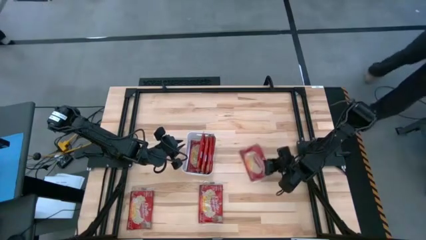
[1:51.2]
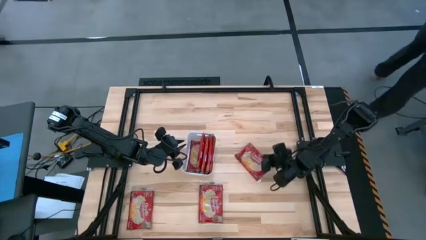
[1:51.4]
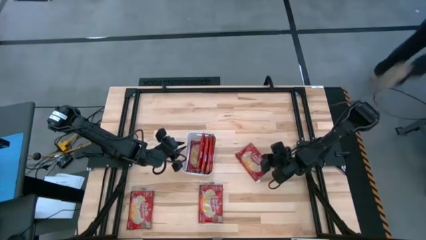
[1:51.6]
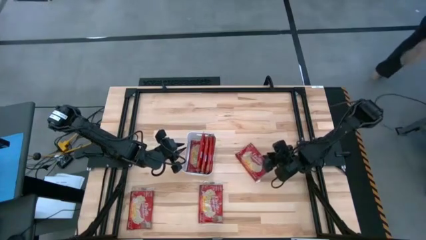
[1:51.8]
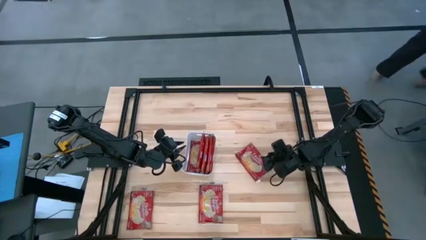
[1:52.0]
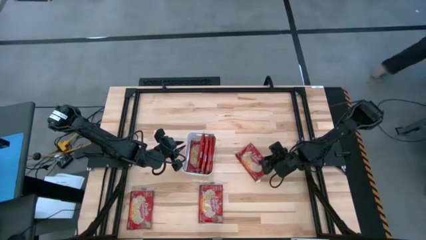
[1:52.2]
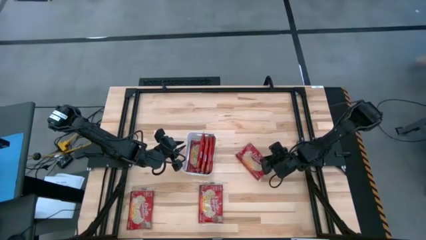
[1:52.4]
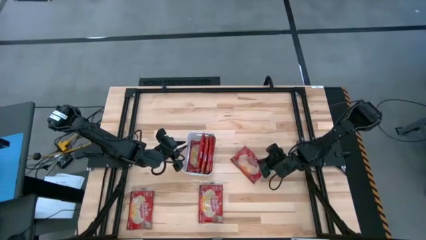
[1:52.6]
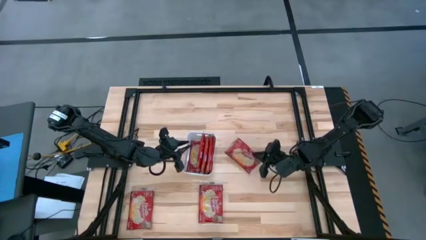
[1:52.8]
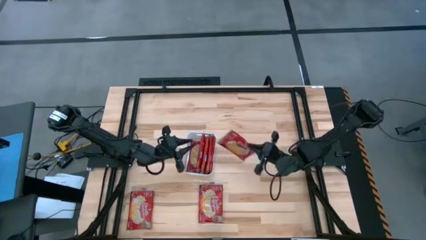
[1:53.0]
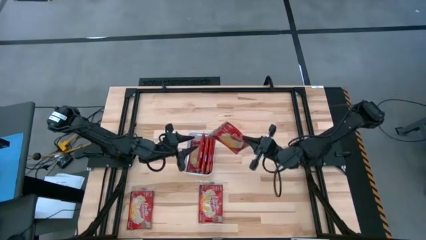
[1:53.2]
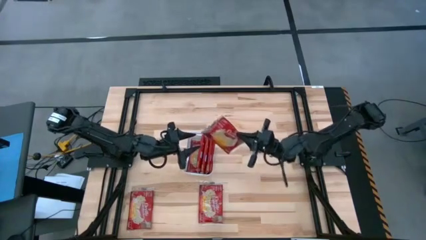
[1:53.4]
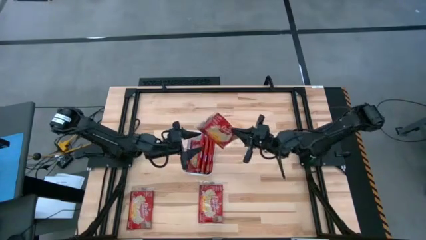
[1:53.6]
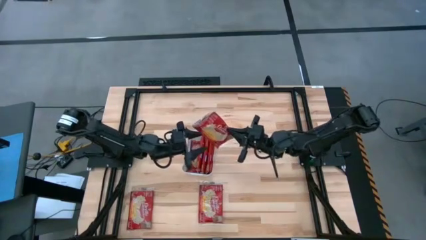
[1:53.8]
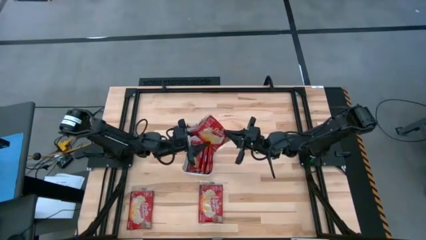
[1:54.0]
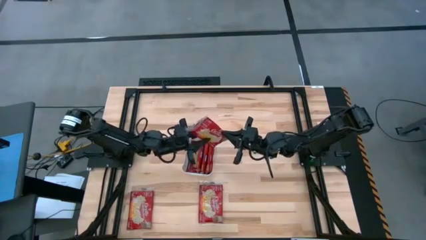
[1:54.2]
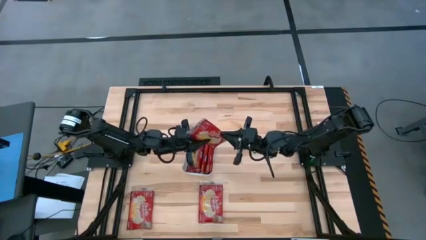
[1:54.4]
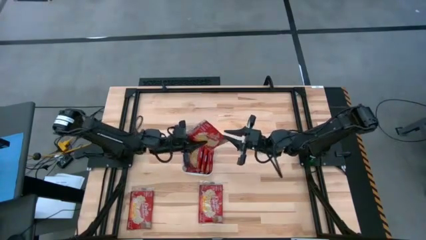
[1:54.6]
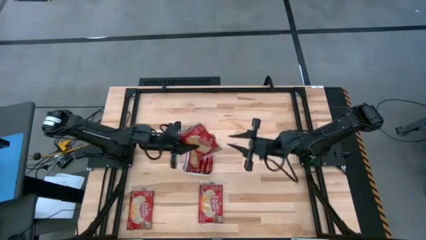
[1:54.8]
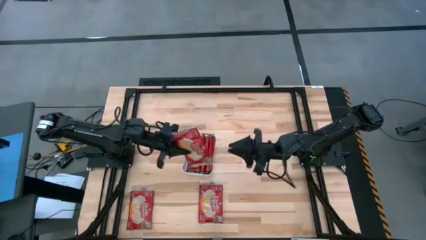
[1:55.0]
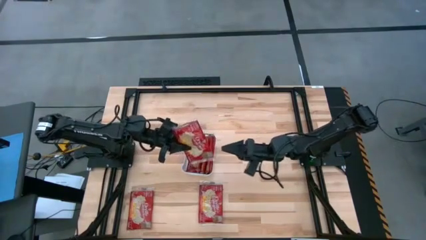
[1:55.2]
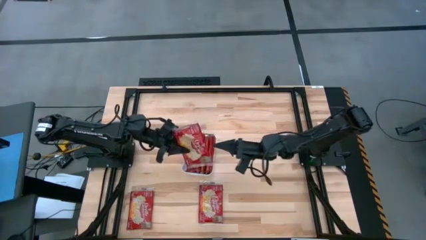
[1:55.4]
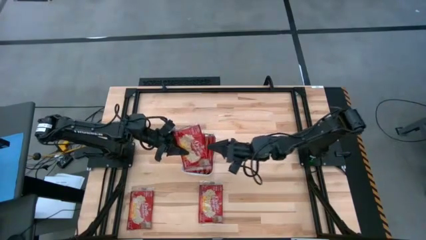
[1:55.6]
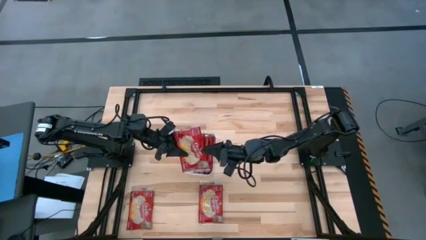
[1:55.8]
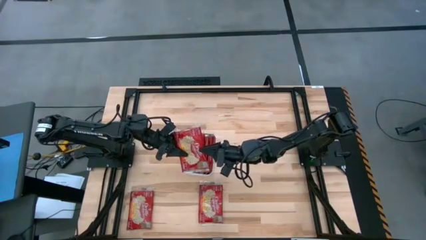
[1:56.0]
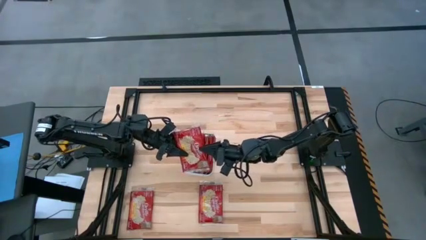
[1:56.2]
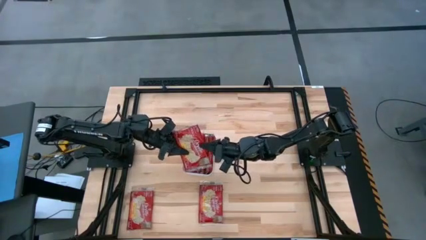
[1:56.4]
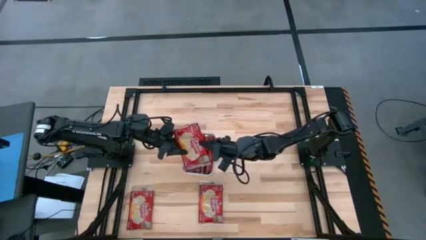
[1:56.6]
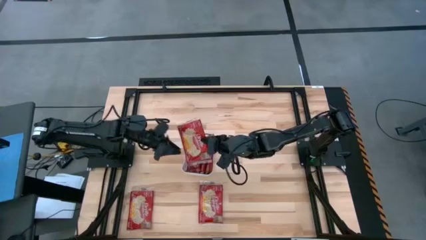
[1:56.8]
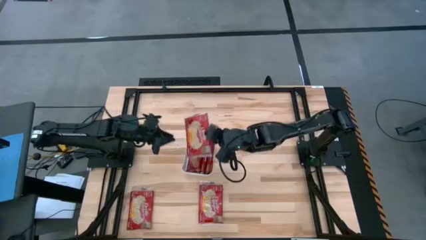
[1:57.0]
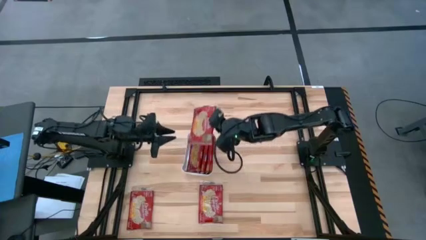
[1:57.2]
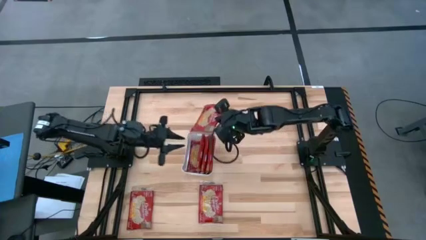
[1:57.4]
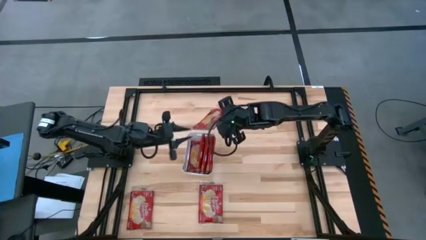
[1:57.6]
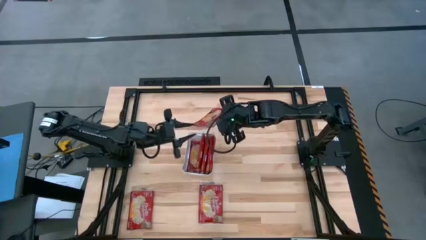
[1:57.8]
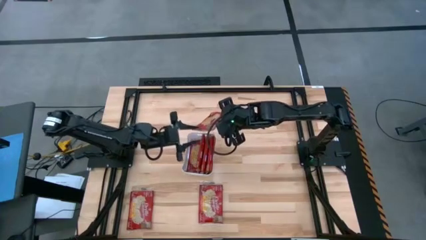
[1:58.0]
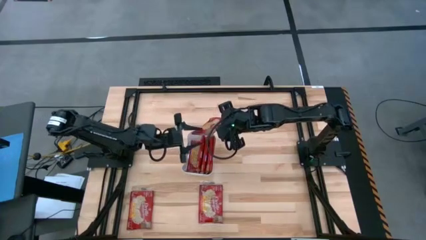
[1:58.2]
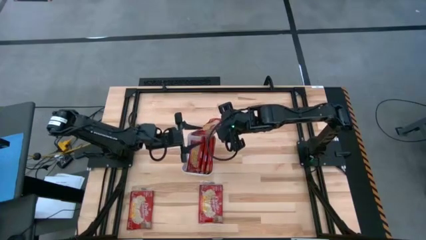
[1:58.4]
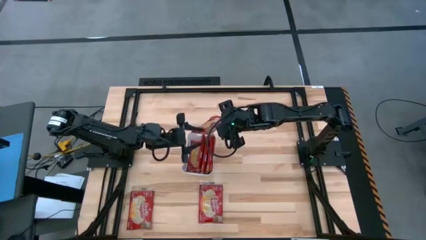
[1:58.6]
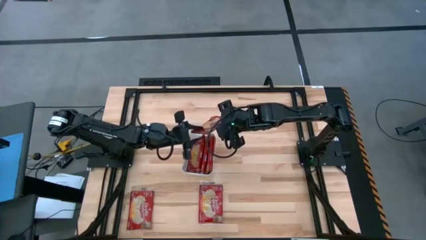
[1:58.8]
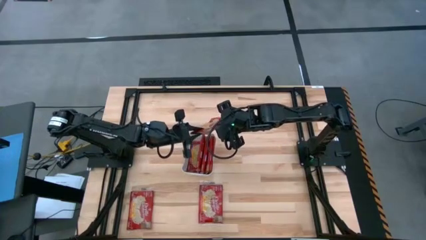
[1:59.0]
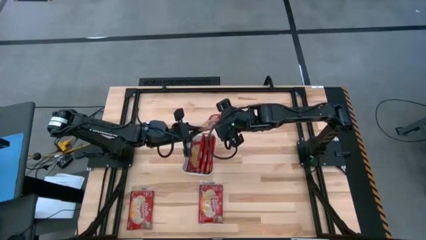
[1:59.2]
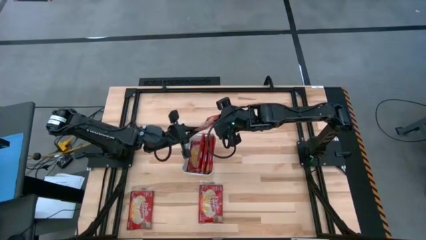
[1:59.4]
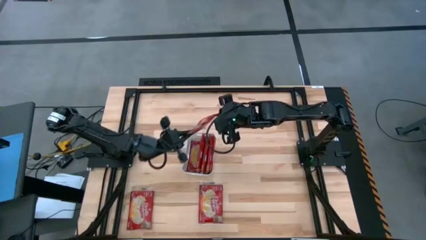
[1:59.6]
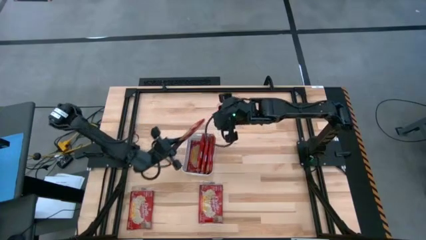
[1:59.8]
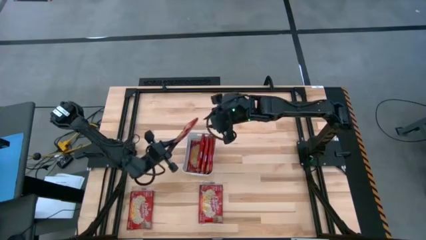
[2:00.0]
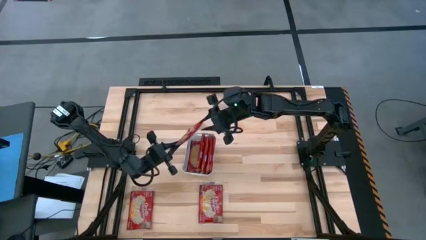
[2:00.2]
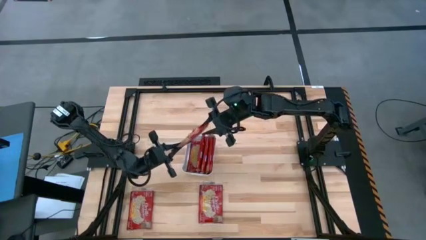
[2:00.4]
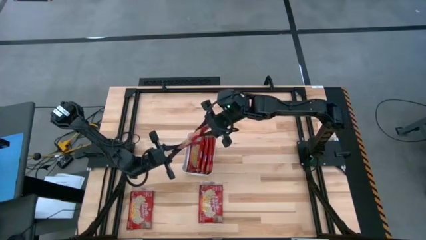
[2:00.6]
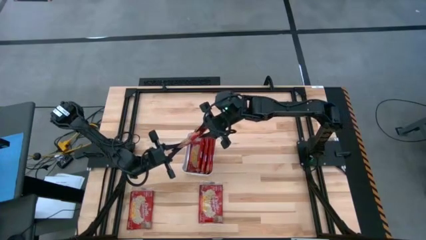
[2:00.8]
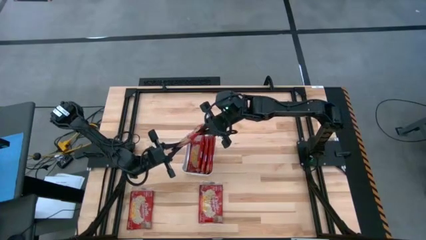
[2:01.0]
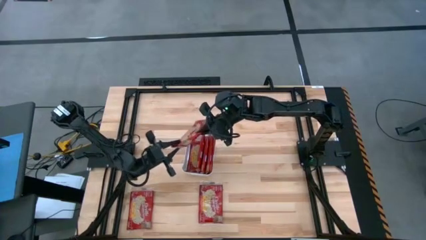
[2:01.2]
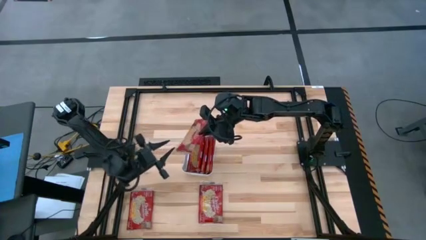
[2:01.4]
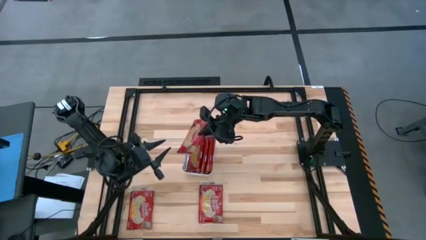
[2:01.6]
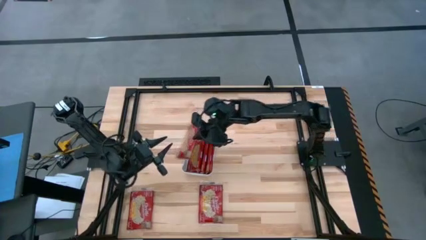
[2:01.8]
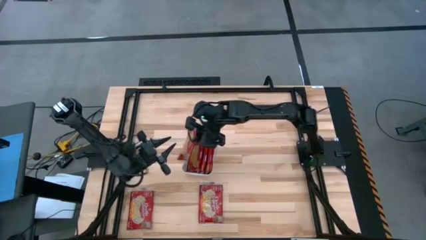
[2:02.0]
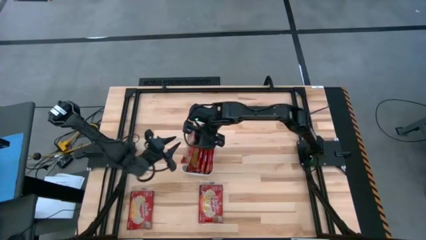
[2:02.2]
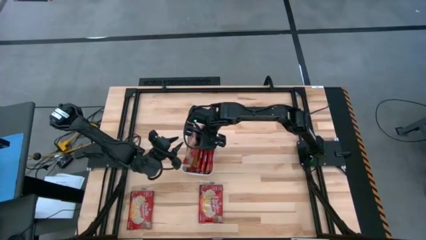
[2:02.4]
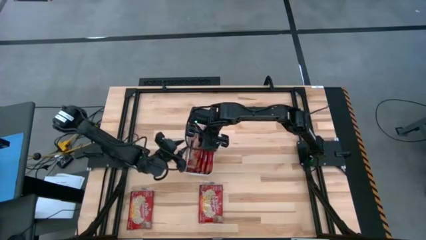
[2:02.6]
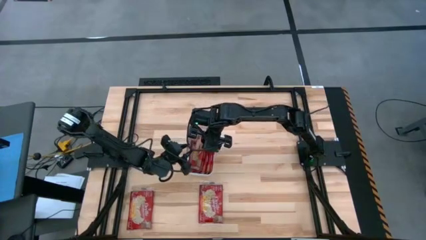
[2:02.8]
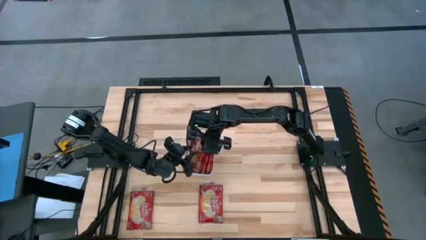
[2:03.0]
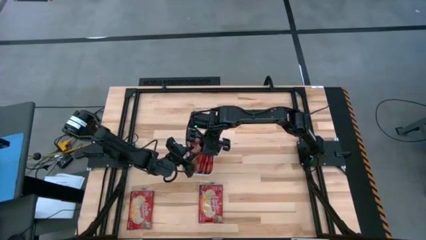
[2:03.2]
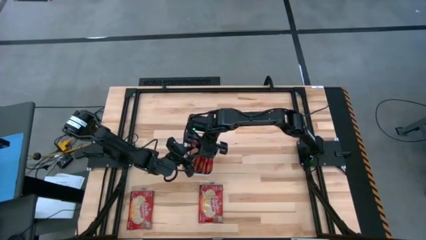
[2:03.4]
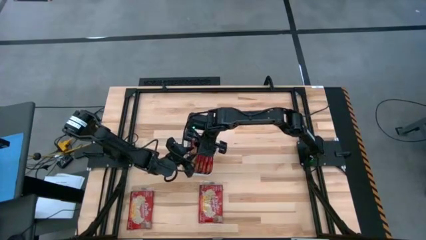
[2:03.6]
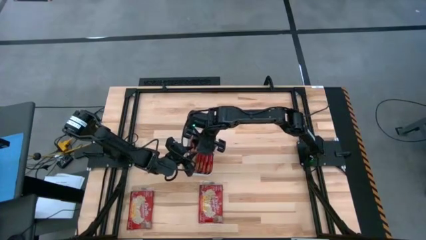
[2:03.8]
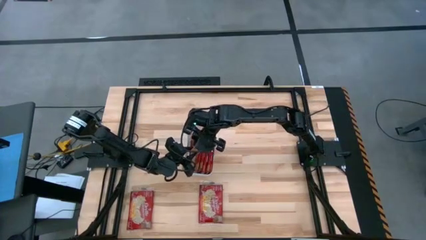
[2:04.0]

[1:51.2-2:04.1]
Task: Sort popcorn bags into baskets
Put the red popcorn bag into the white bin

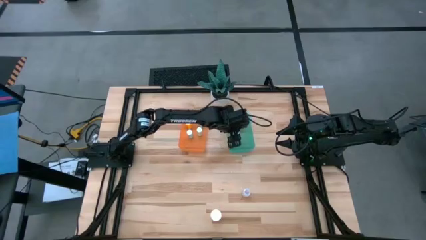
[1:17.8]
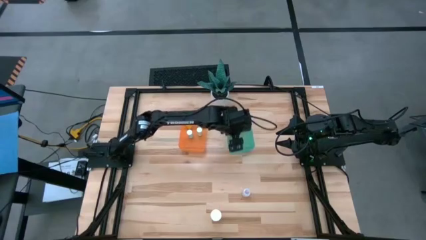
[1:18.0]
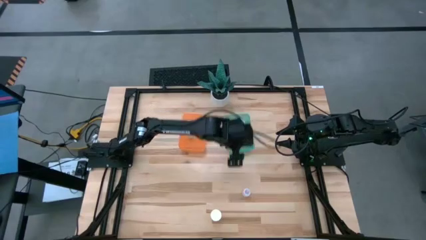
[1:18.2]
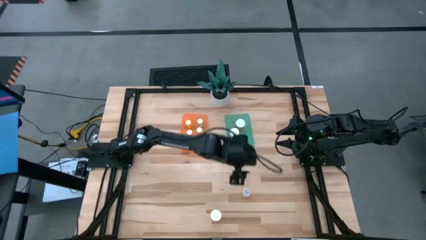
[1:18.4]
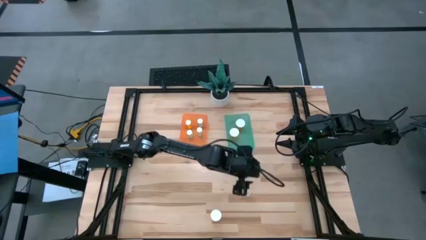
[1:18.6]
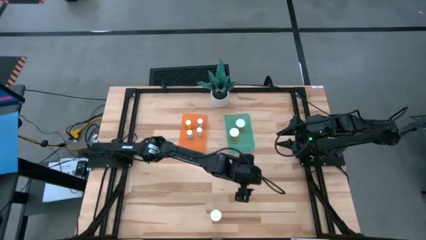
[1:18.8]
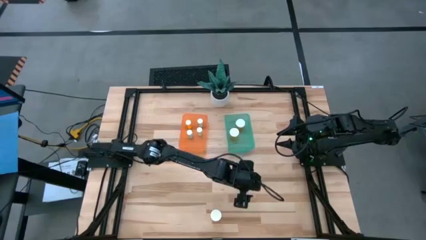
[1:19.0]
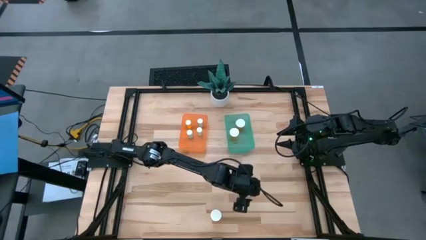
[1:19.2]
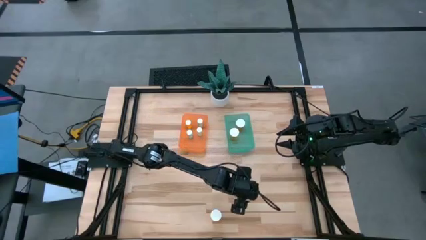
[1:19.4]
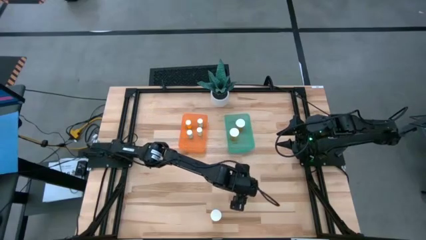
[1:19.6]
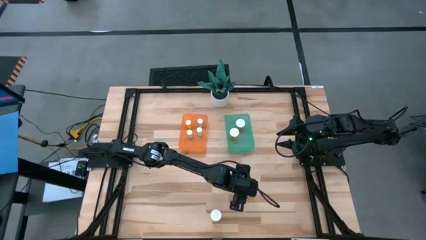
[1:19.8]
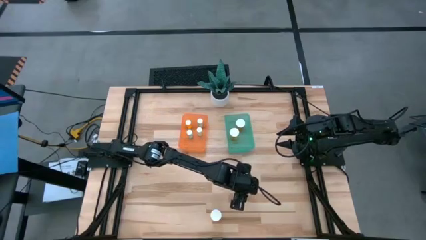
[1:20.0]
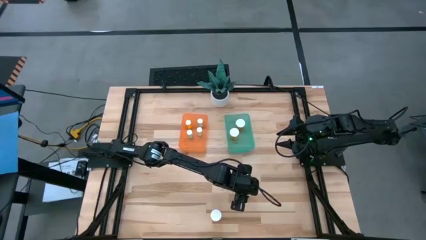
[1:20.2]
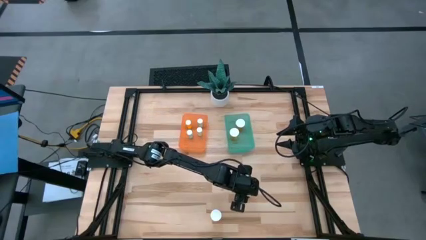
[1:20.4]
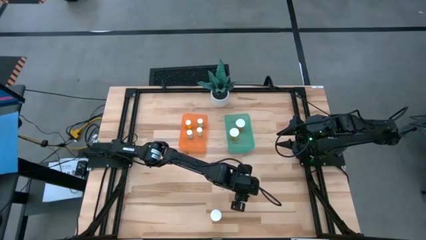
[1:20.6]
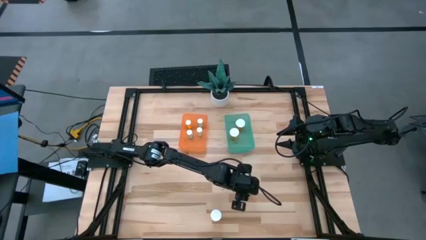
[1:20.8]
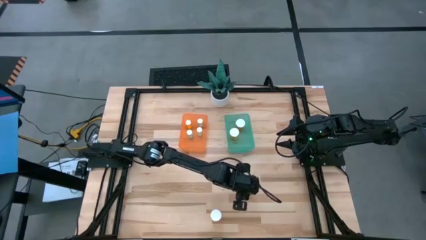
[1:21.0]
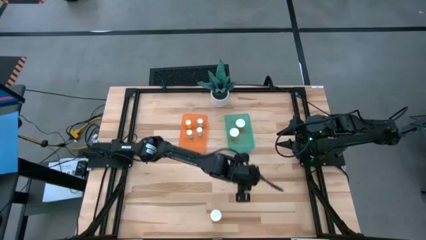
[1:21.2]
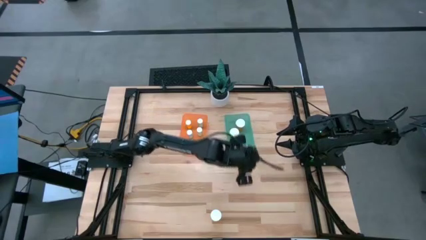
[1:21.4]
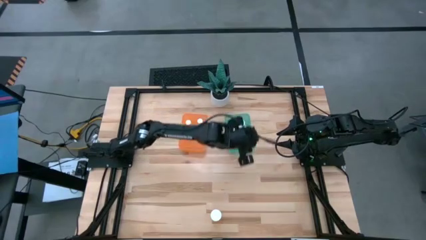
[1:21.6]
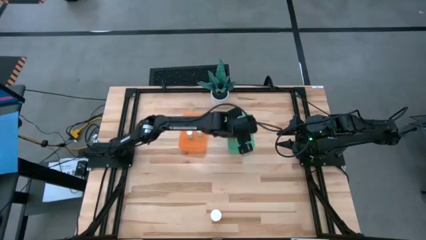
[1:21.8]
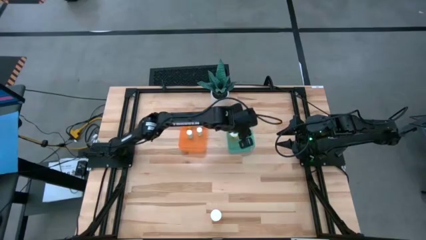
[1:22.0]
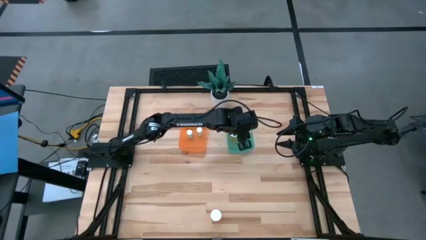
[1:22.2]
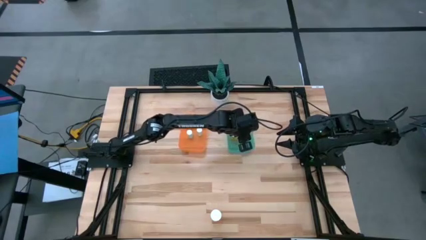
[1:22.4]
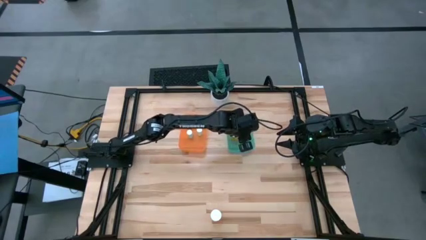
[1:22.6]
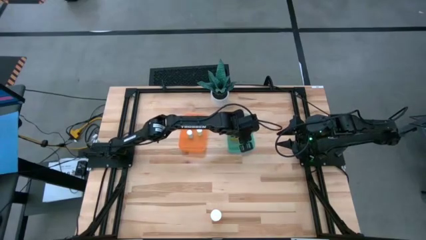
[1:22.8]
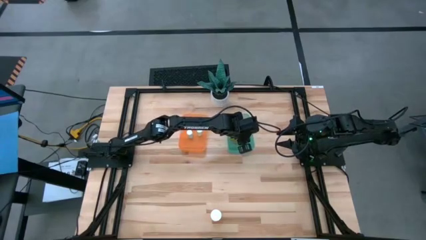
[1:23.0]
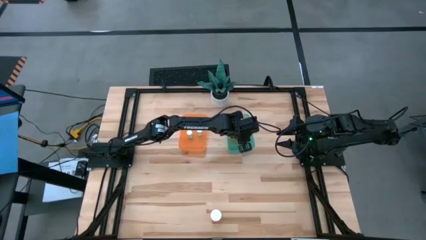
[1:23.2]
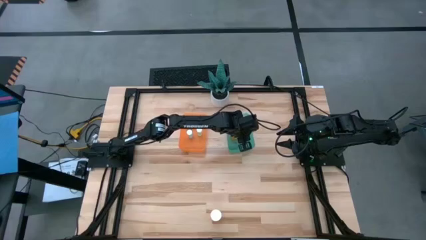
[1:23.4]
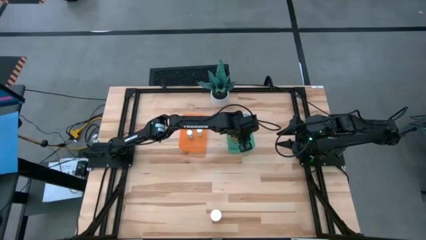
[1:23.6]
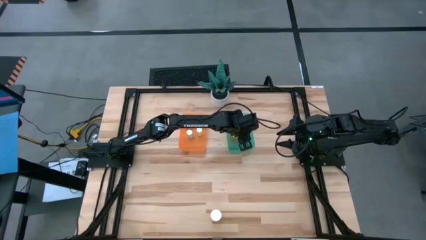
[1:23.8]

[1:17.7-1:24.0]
Task: Pick and place medicine bottles into bin by pill shape (circle, oval)
Put the transparent pill bottle into the green bin
